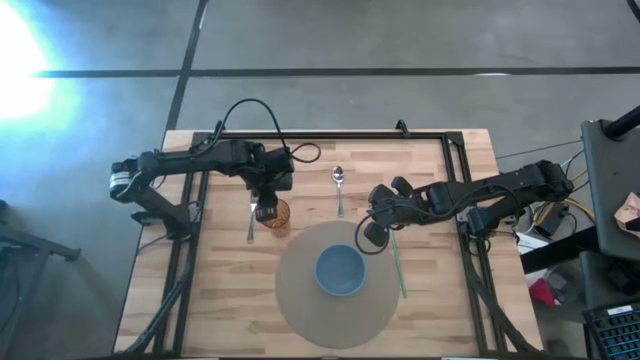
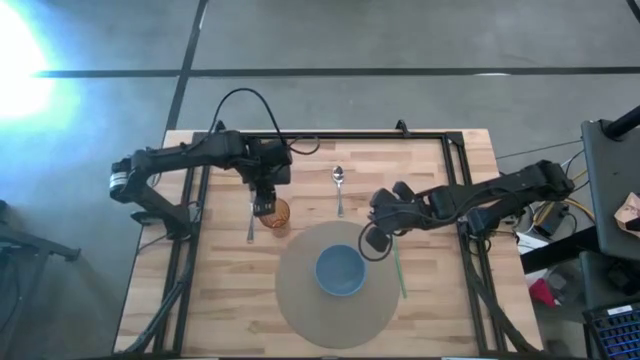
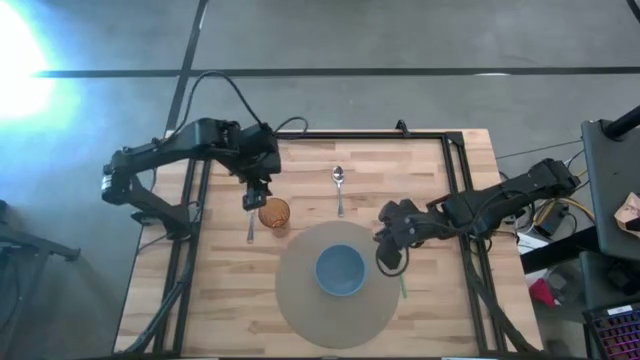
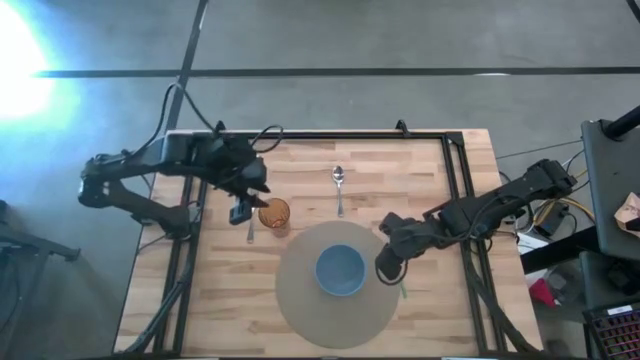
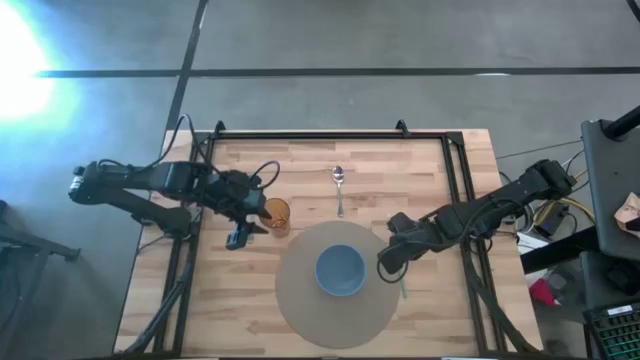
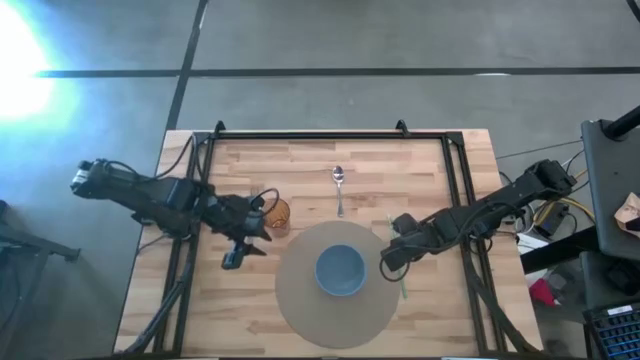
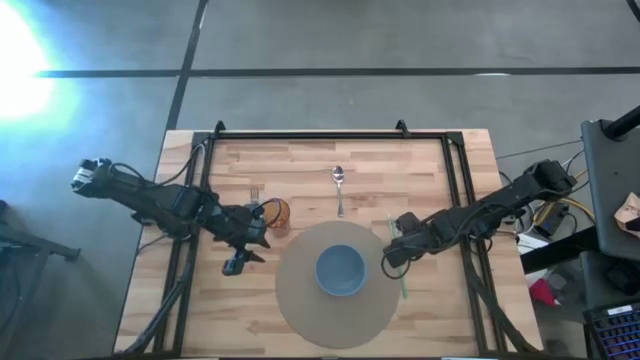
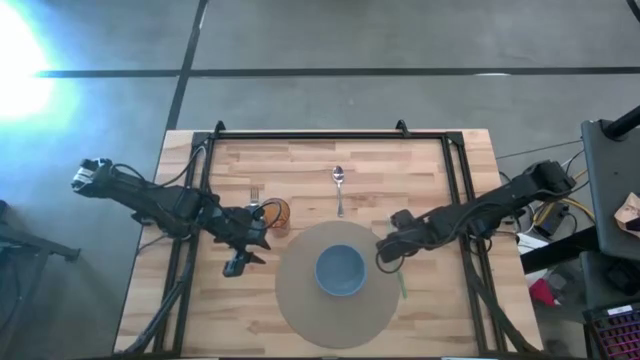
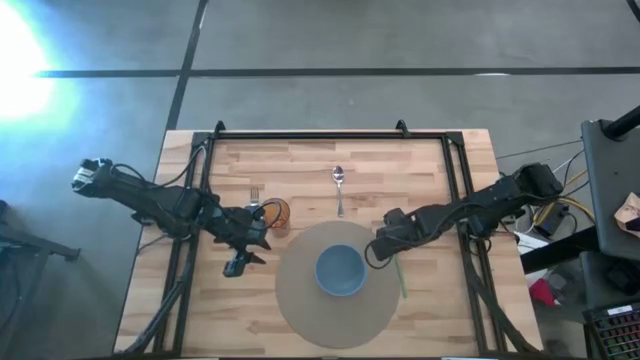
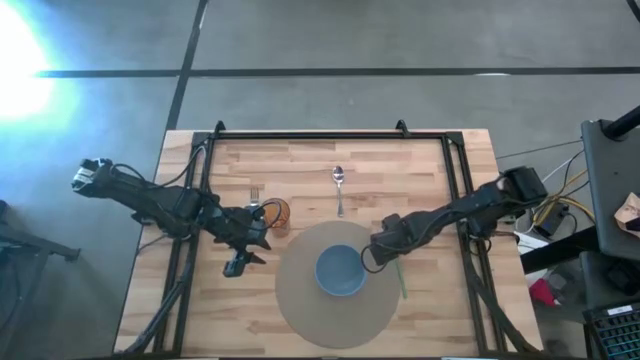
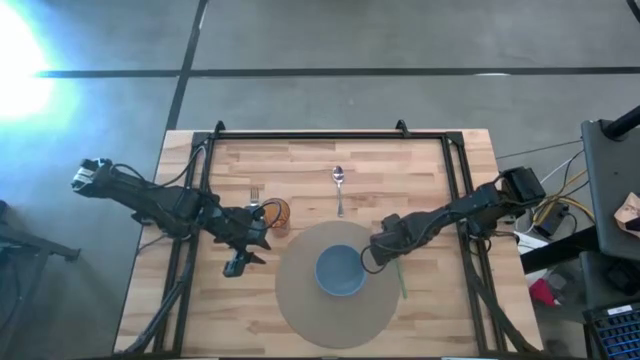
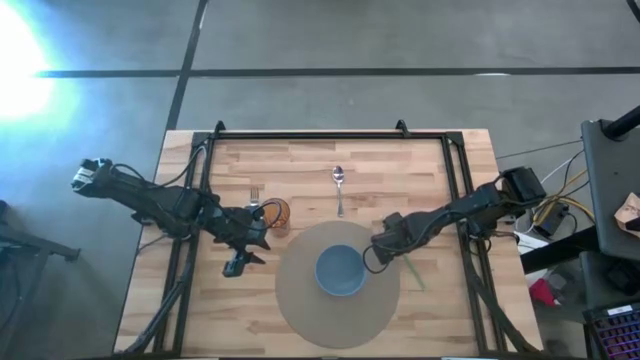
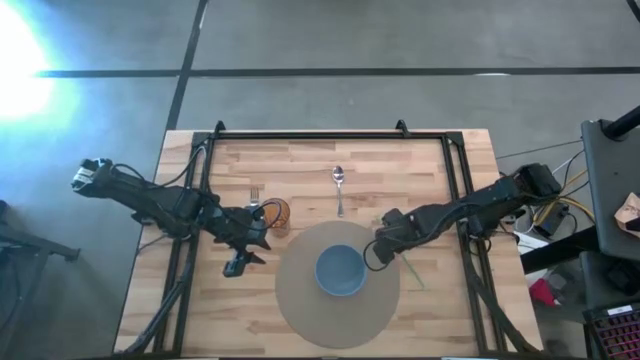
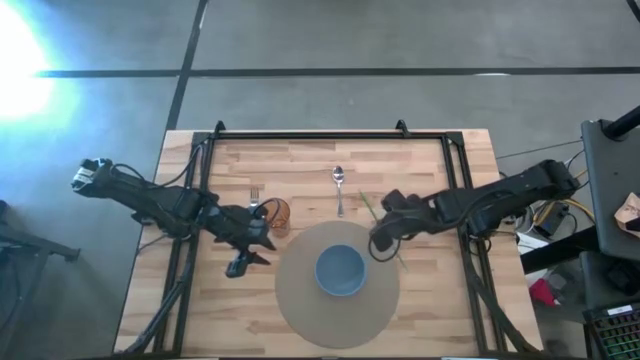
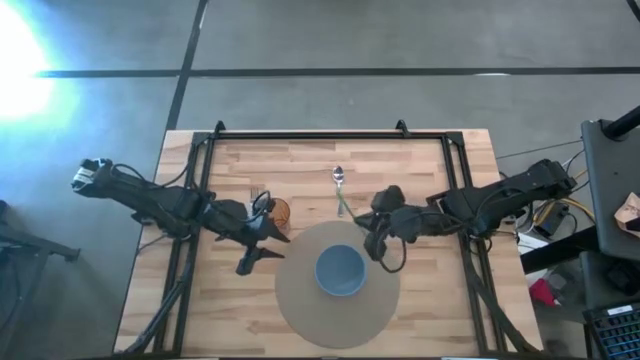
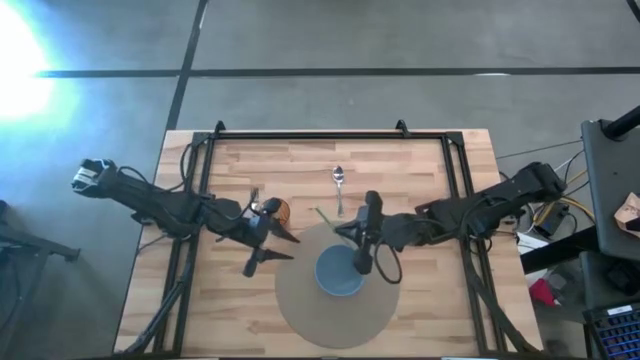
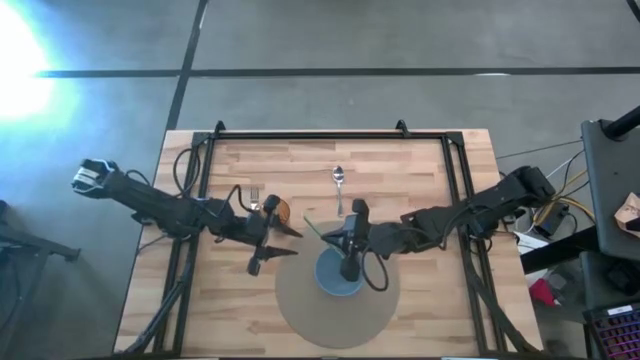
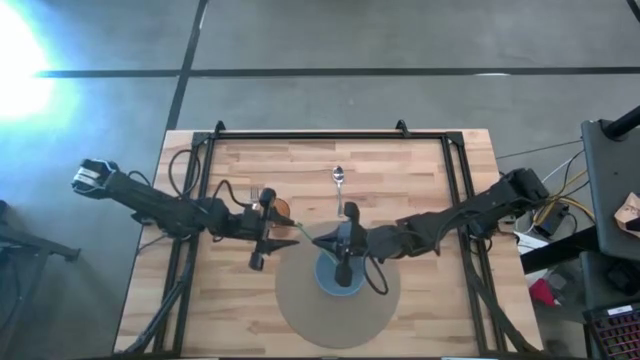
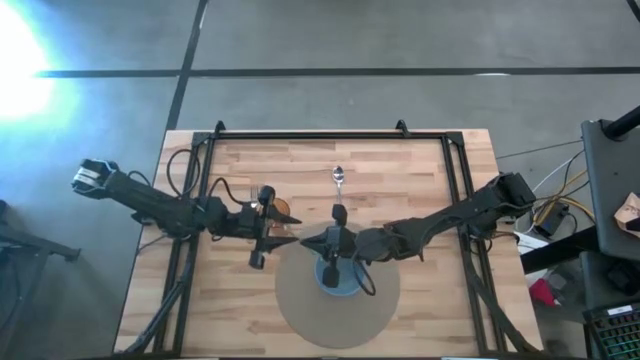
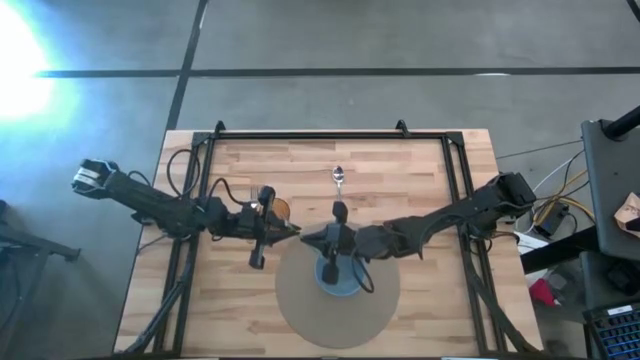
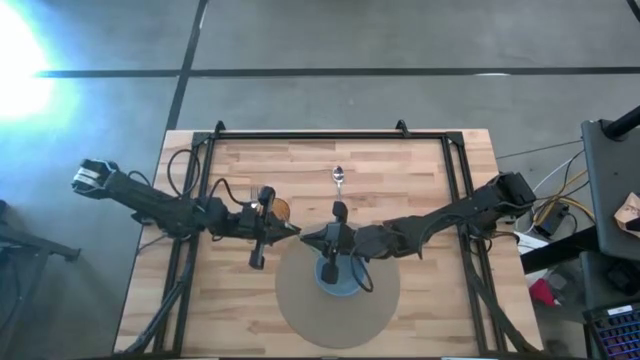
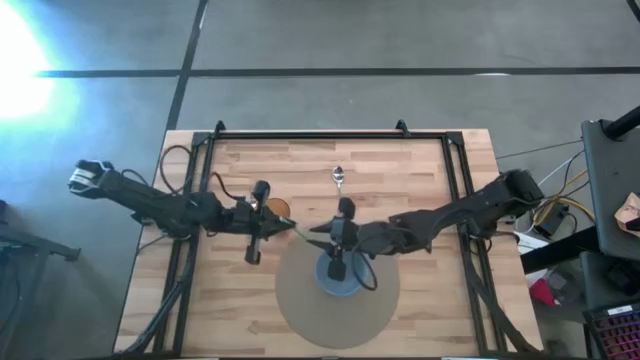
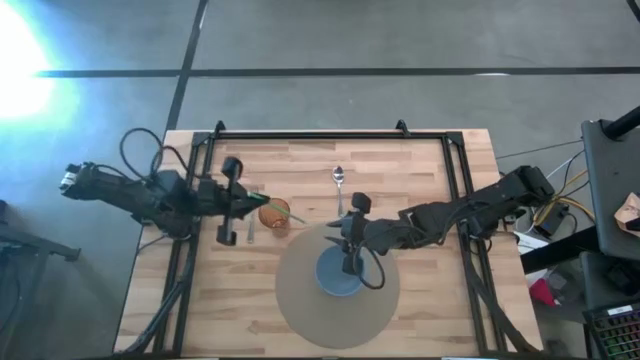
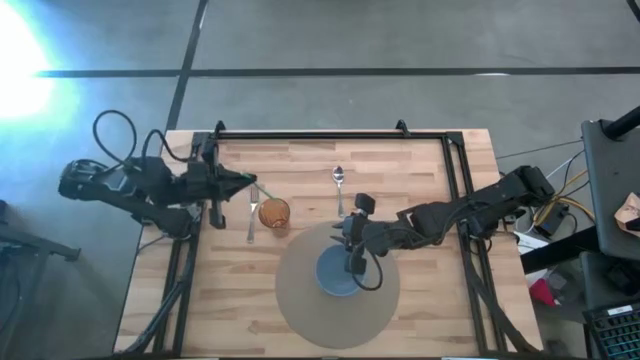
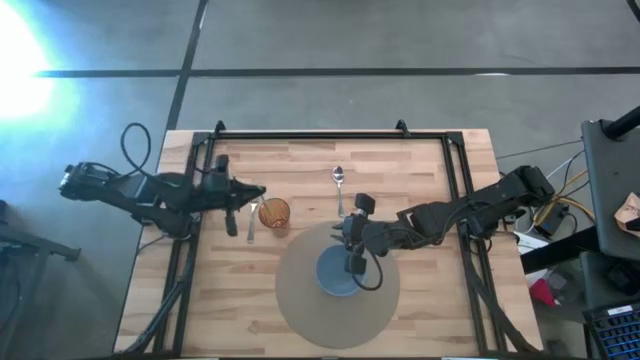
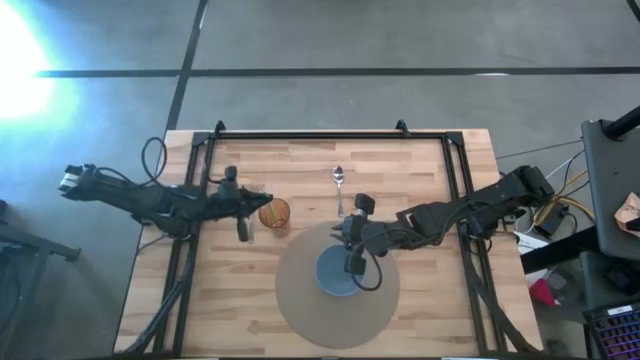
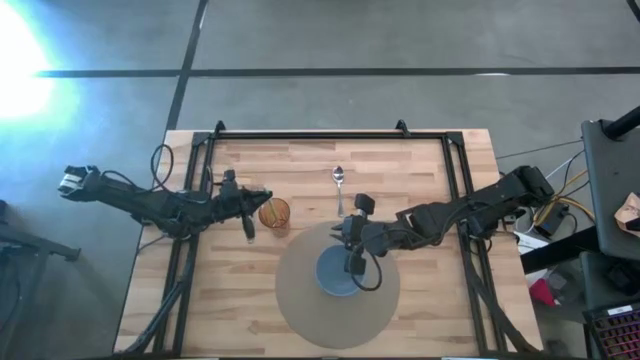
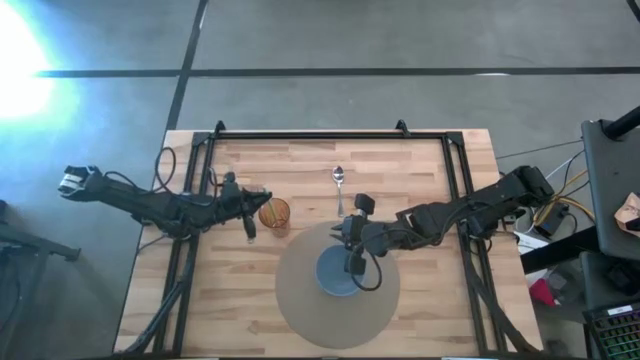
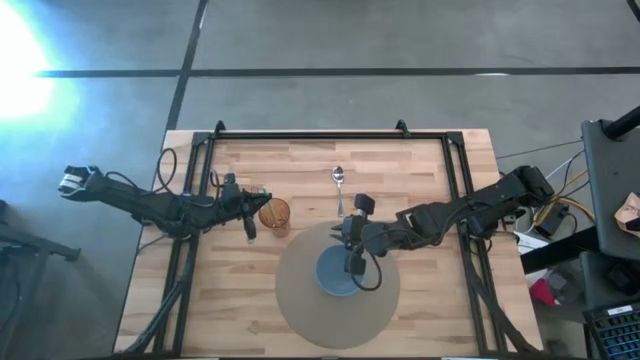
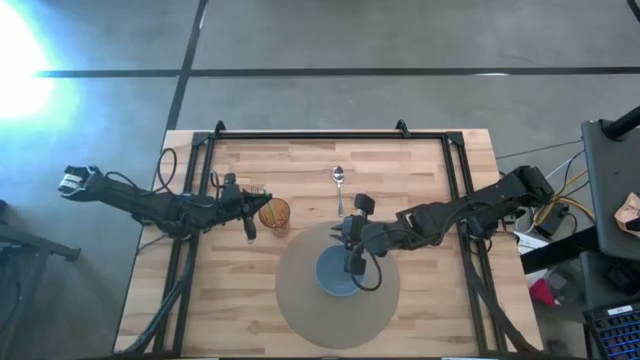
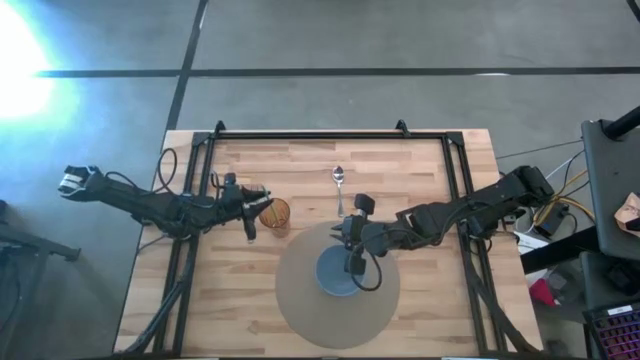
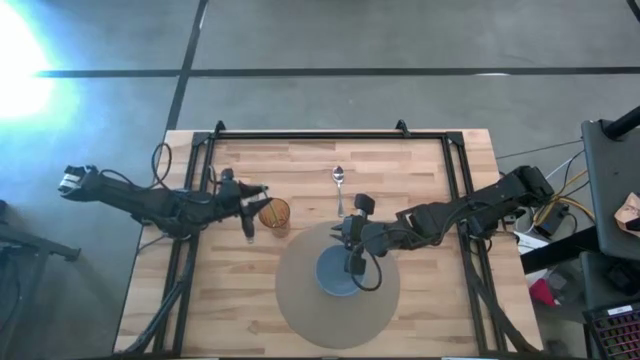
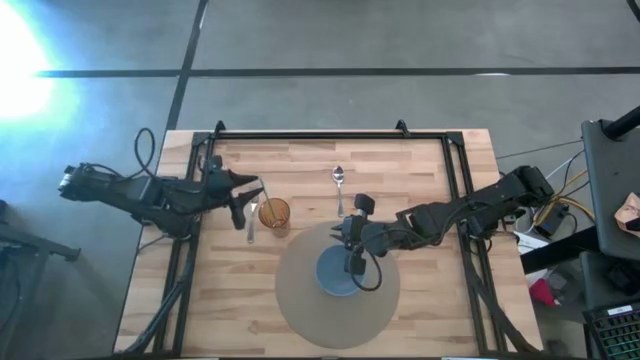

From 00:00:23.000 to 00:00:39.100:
Task: Pick & Place Utensil
Put the green straw into the brown cup
